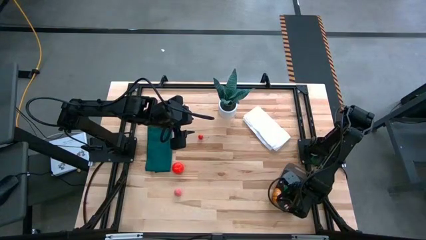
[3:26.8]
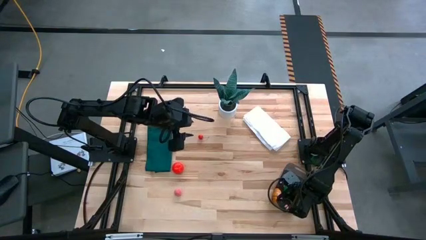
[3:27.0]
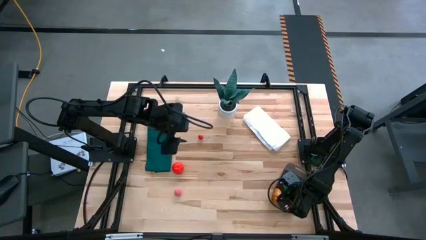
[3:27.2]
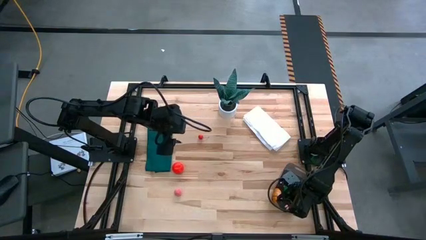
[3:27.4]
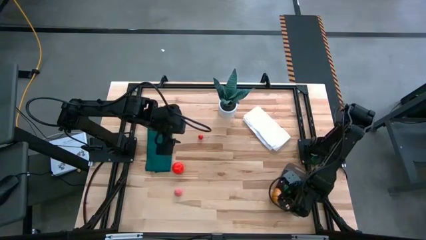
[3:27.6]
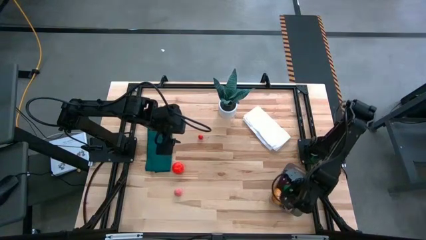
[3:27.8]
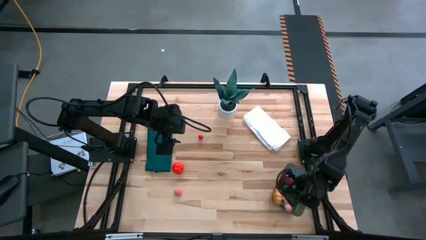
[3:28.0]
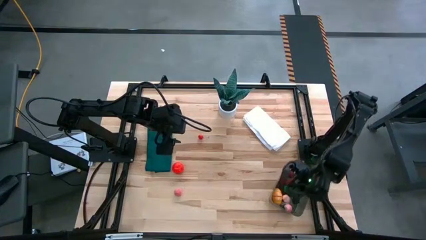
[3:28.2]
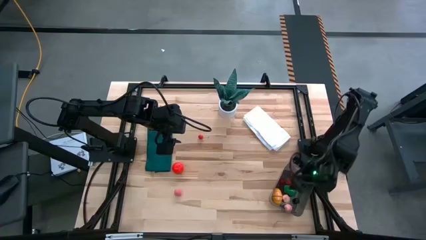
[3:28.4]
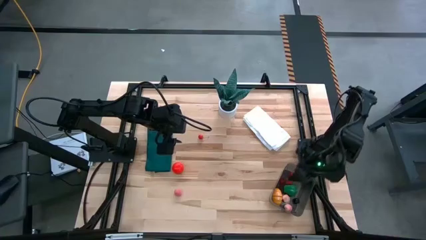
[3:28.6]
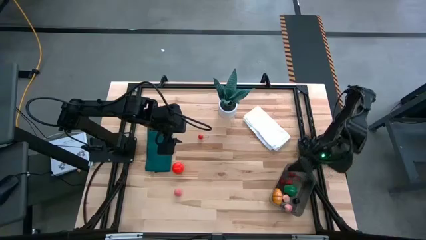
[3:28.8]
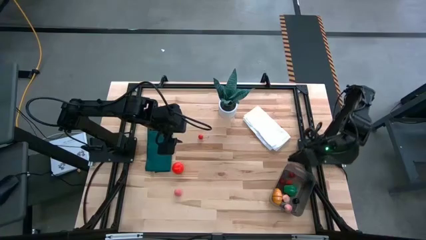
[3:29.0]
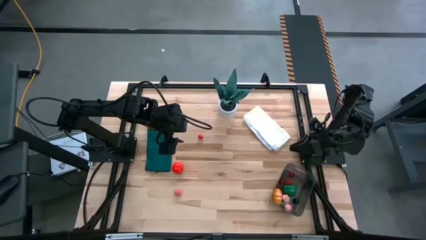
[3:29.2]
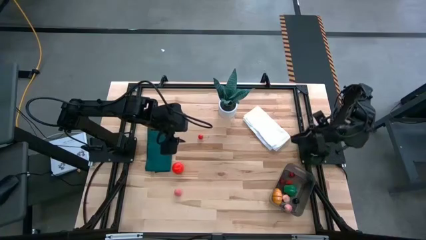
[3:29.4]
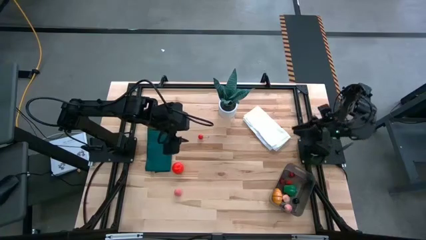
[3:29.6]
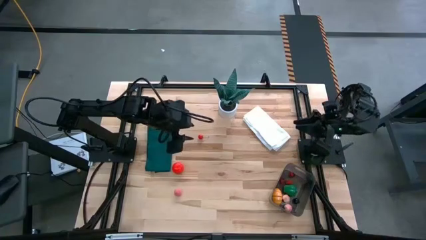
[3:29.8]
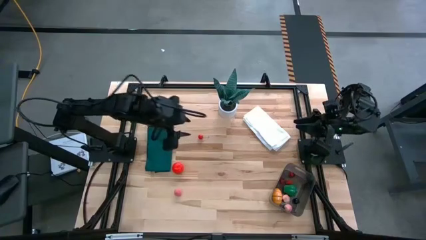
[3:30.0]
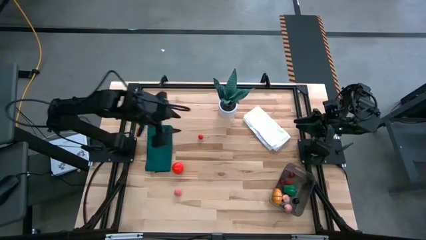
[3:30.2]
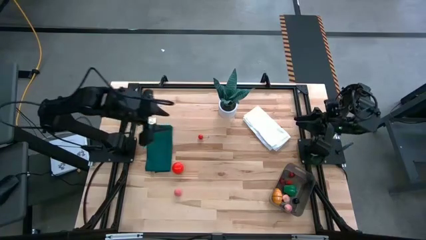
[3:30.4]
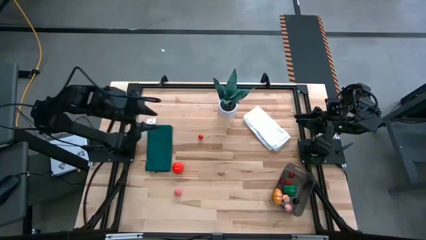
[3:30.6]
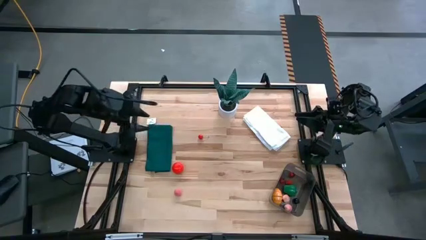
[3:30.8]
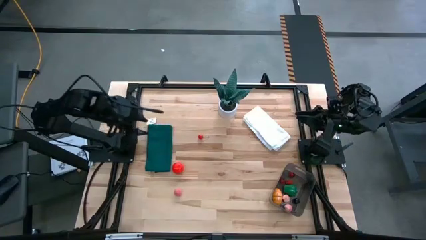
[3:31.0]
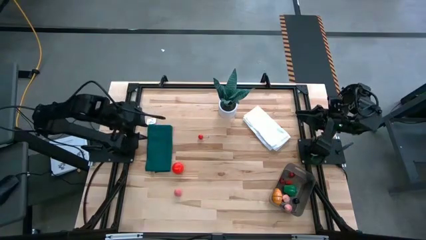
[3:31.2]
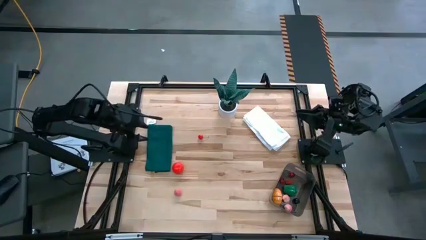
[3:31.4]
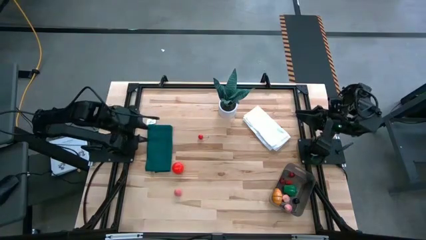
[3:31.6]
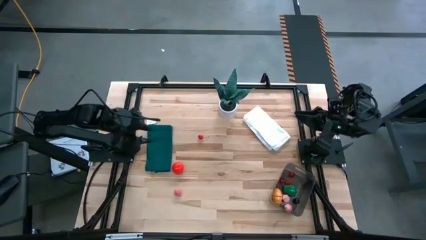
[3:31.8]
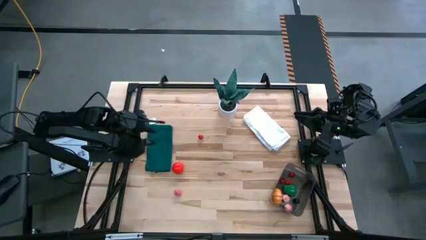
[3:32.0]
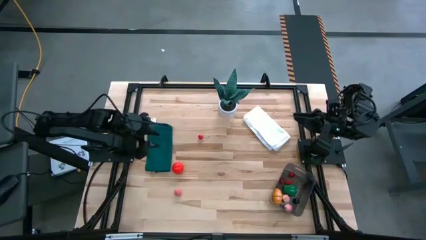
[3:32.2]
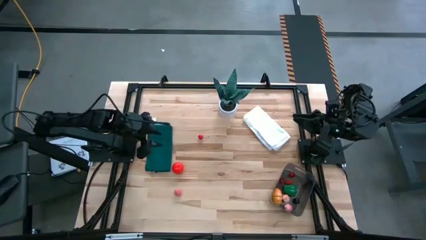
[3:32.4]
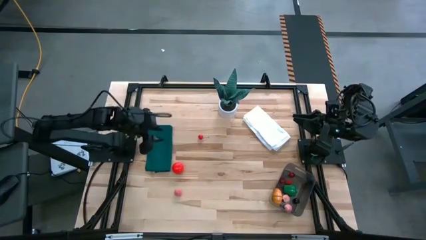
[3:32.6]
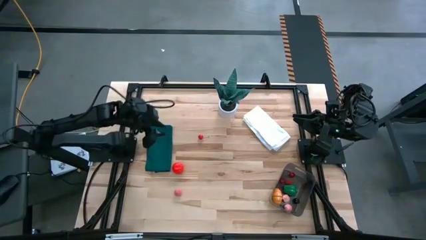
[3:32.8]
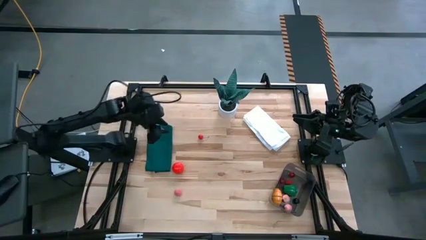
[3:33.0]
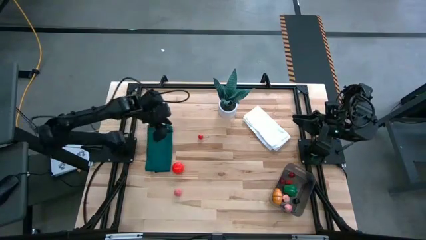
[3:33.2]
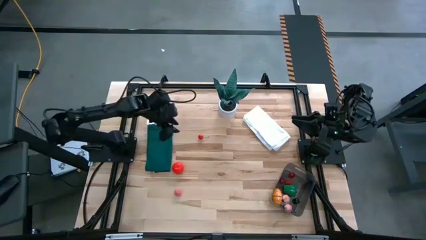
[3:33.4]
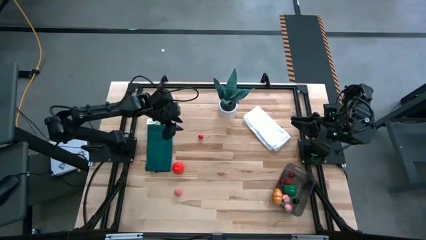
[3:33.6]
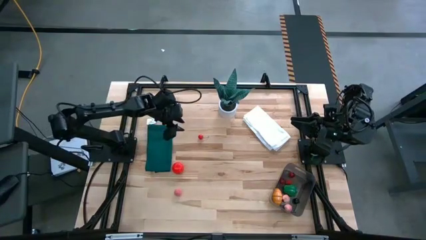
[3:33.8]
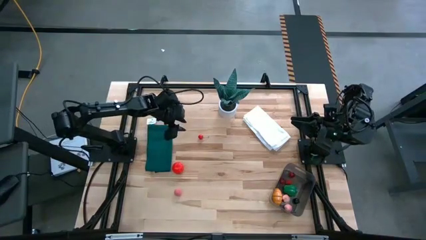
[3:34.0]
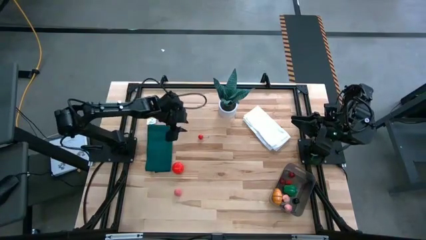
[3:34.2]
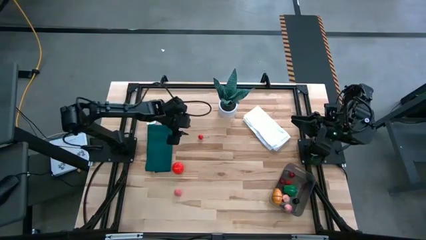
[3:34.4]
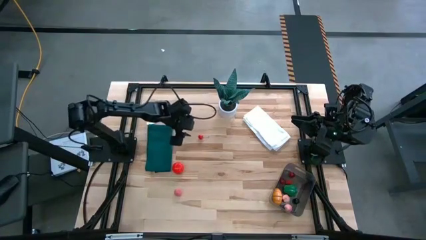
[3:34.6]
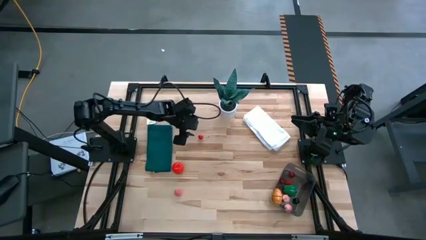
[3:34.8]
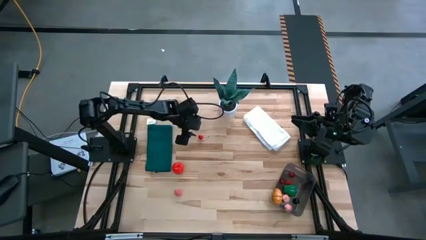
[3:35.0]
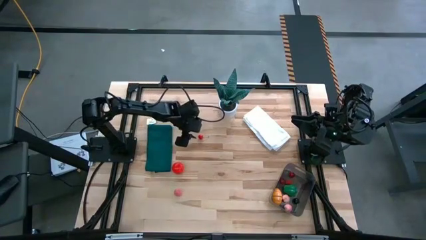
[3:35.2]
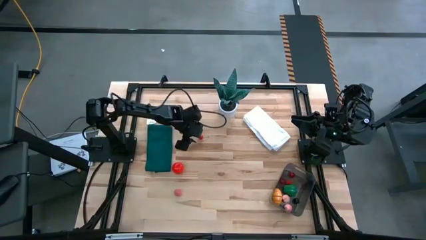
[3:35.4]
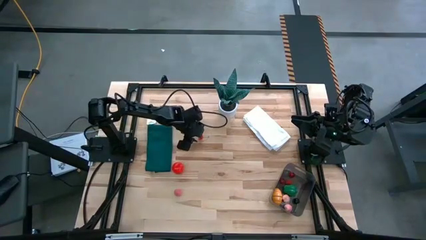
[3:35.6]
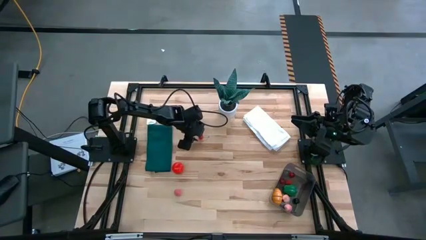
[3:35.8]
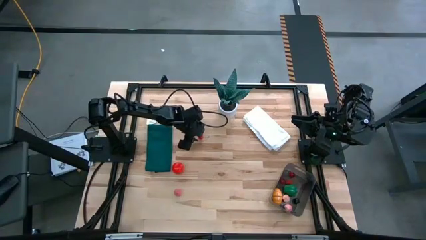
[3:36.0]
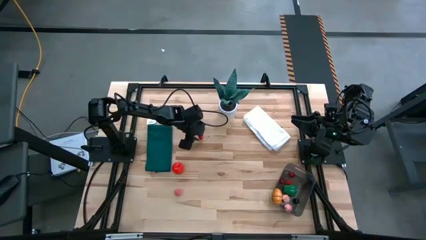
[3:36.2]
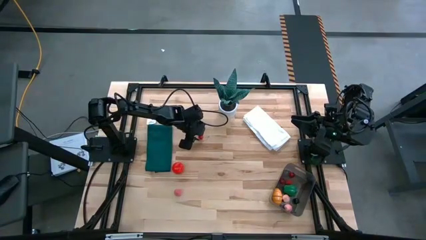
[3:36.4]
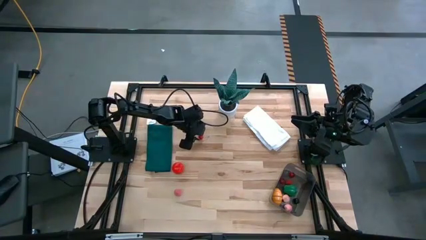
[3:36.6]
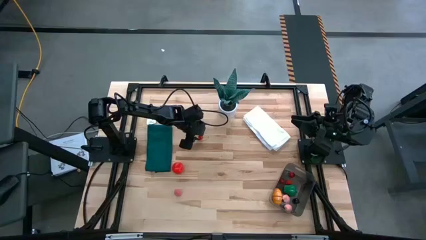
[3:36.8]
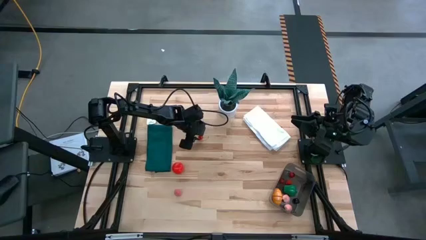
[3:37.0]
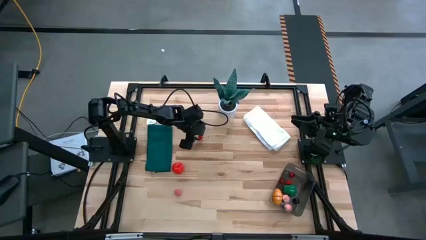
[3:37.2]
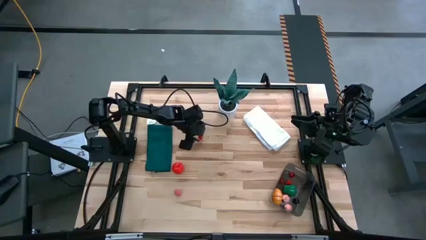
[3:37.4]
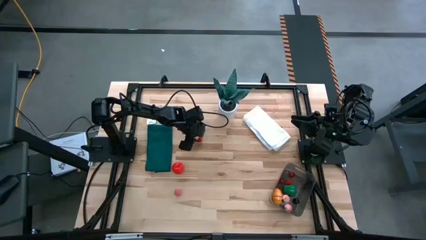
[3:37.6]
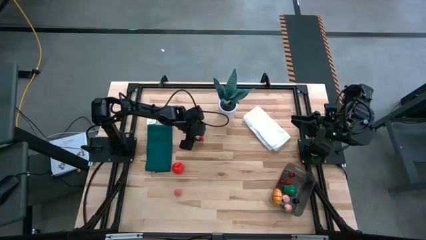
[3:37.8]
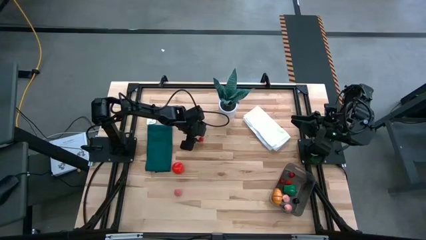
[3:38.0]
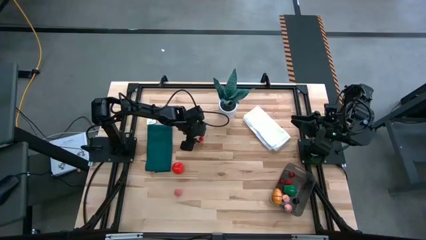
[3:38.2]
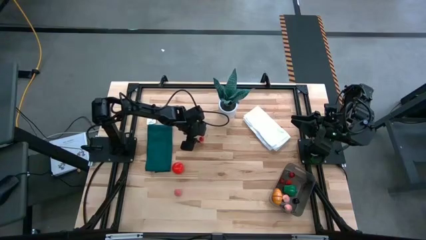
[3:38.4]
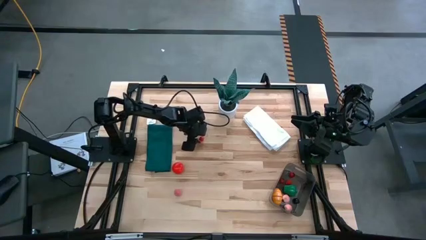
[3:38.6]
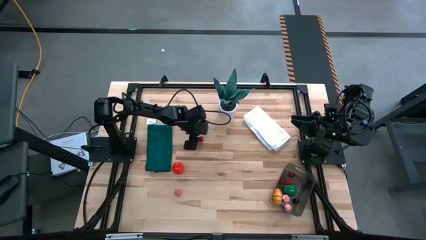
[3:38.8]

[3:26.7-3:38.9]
Task: Pick and placing Produce into tupperware
Put the red cherry into the black bin

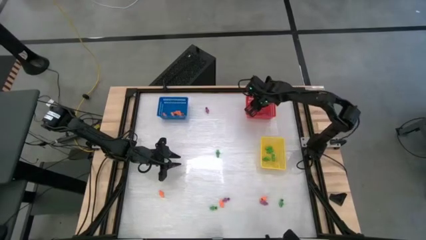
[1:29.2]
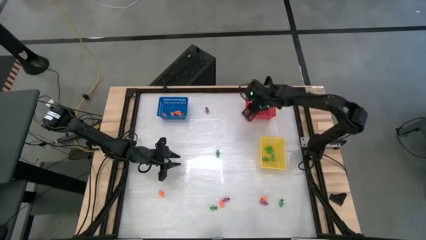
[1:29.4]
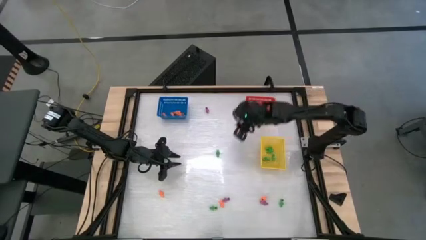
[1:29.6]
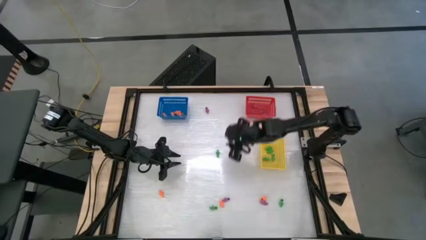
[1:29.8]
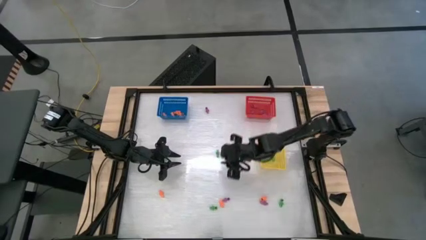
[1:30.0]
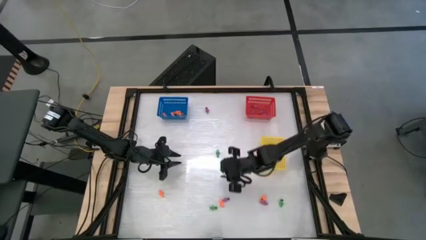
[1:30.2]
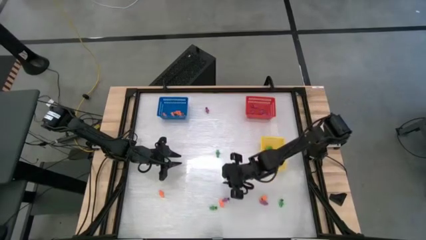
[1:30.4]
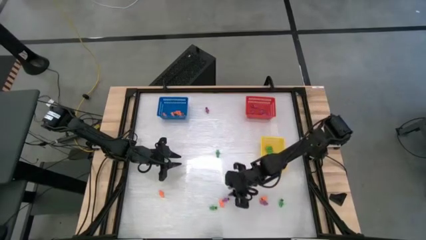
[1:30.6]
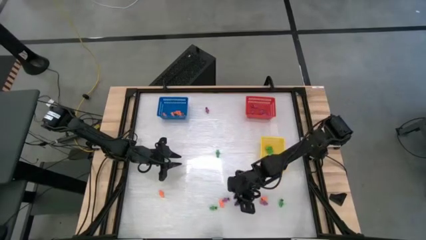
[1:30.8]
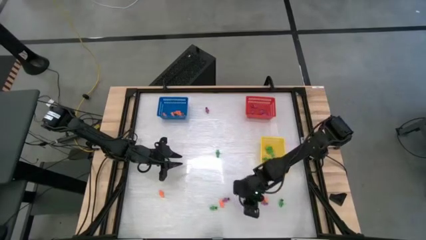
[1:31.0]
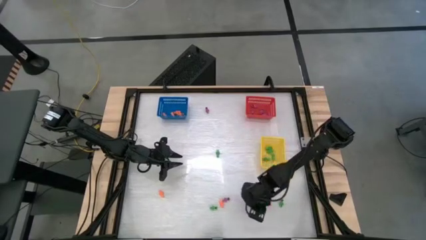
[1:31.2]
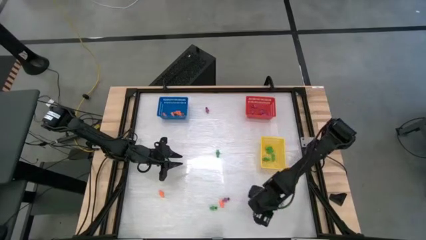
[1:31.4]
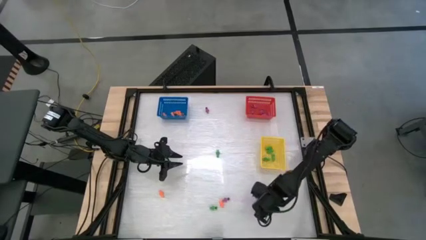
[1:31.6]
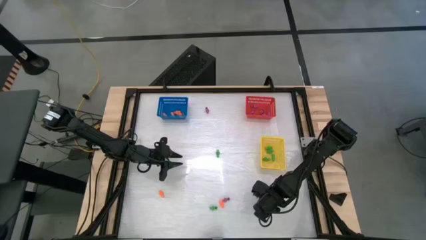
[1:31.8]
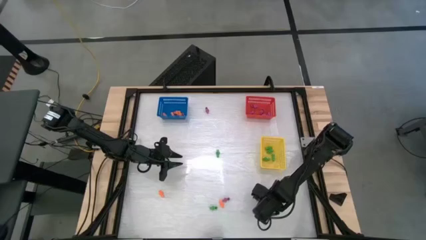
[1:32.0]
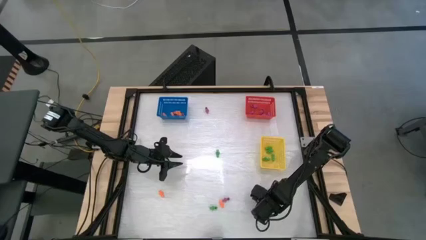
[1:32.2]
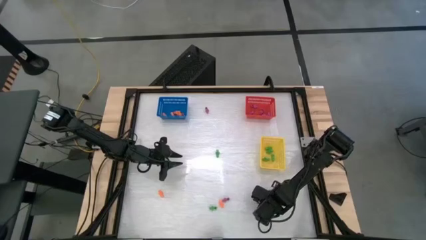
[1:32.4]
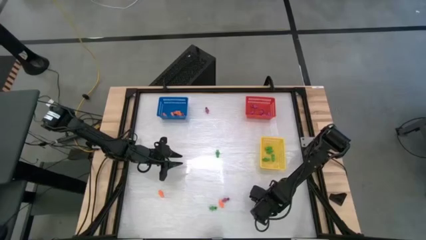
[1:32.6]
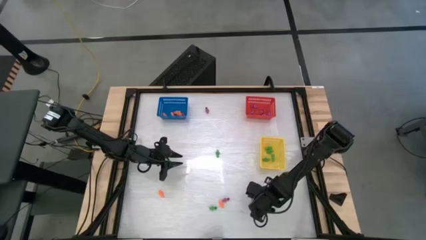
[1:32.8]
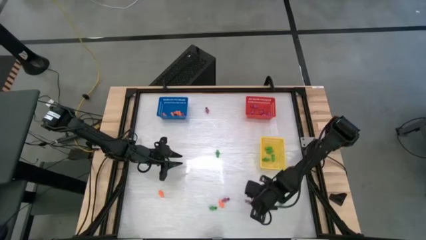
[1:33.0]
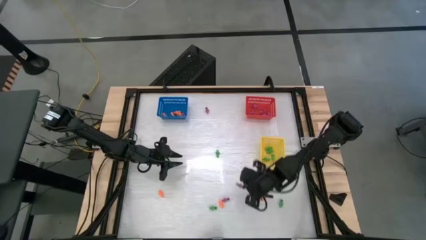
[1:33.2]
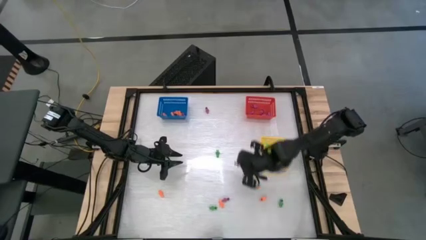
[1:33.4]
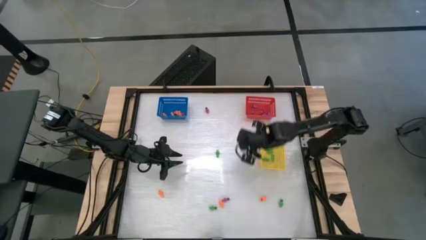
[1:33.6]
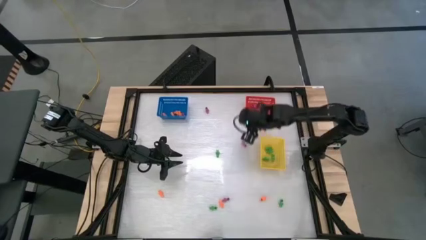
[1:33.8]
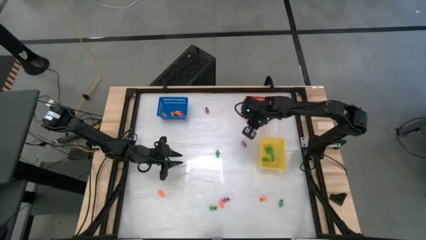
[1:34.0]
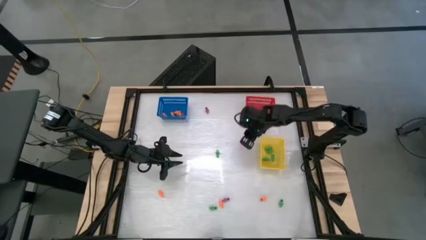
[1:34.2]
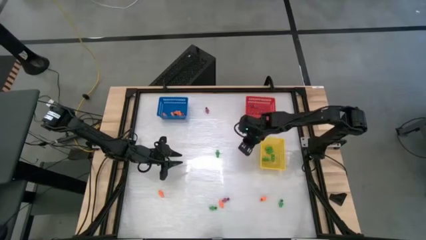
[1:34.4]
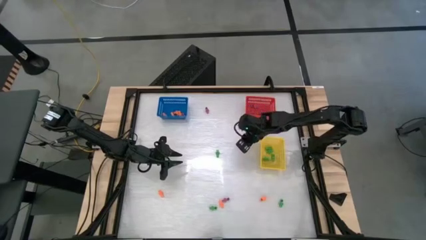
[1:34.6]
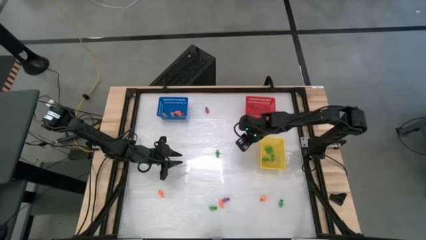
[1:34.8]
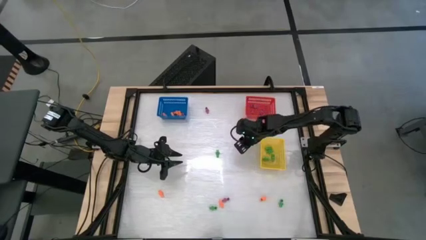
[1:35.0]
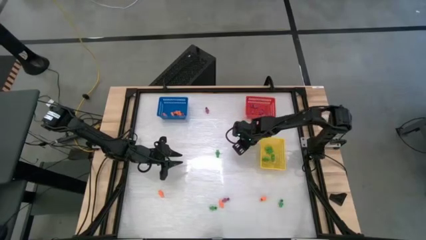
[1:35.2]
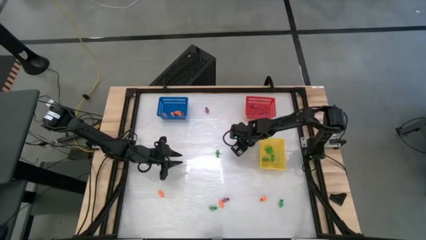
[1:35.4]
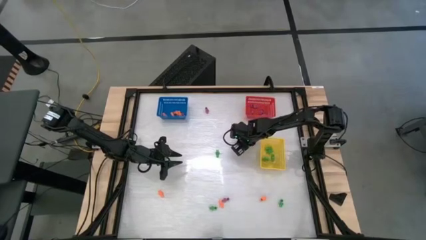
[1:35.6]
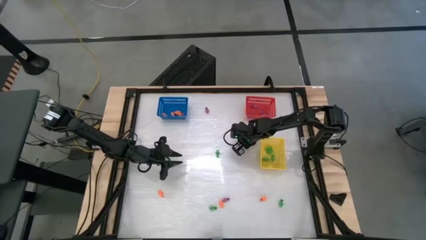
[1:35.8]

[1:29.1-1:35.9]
Task: Sort Halloween decoration
Put the purple skeleton toy into the red bin
